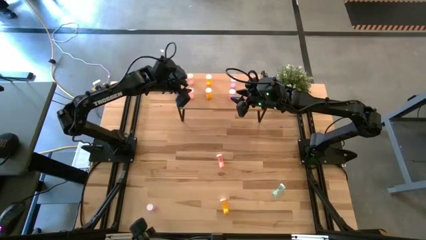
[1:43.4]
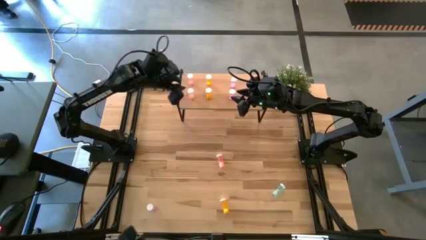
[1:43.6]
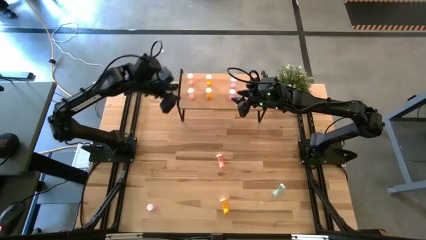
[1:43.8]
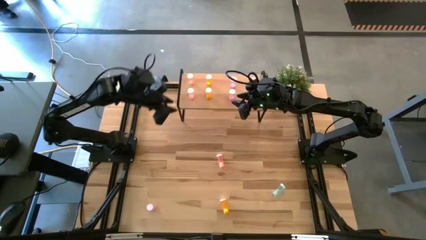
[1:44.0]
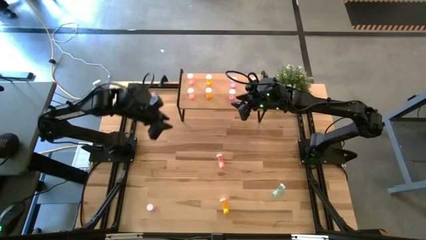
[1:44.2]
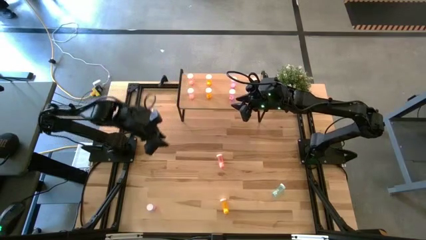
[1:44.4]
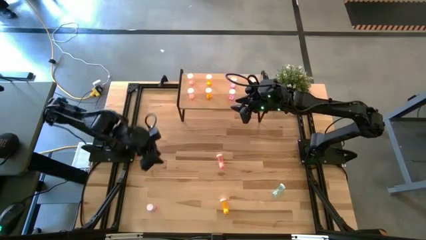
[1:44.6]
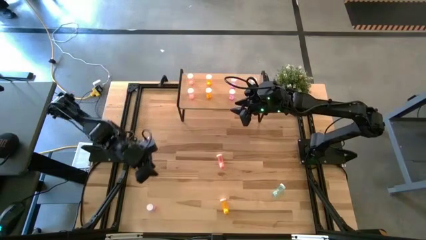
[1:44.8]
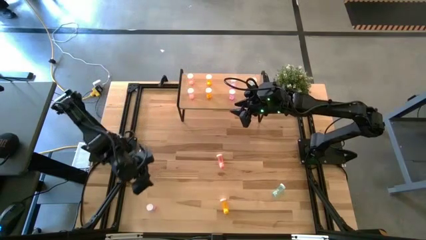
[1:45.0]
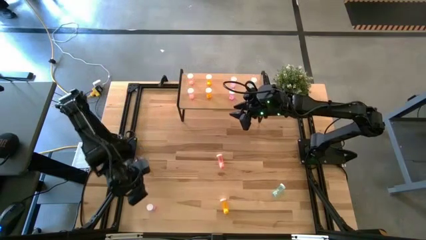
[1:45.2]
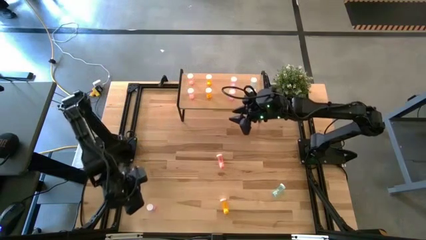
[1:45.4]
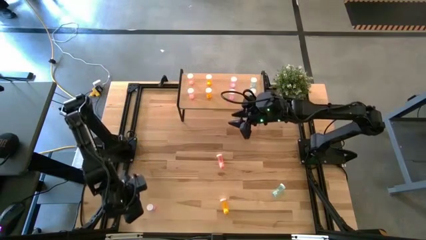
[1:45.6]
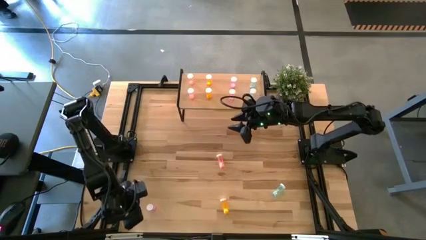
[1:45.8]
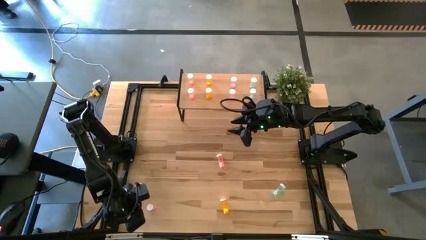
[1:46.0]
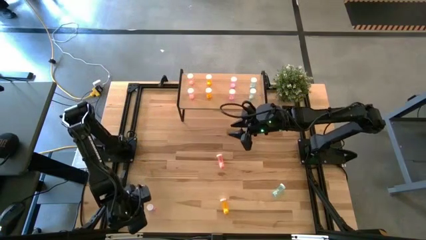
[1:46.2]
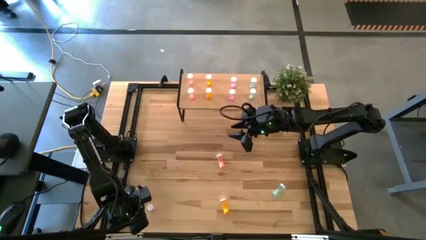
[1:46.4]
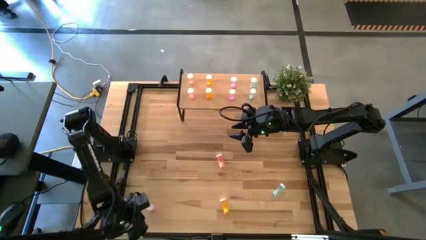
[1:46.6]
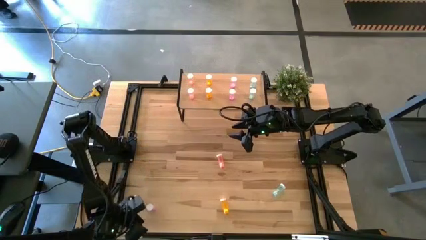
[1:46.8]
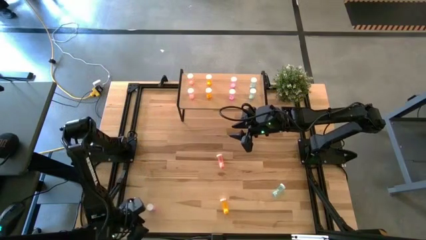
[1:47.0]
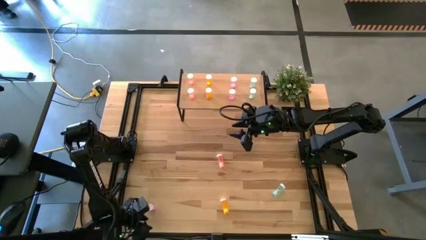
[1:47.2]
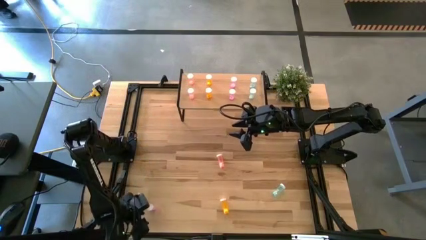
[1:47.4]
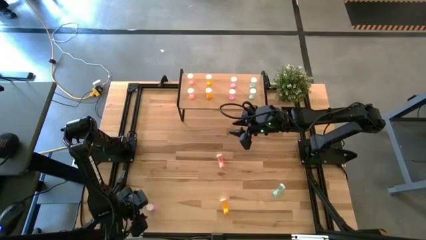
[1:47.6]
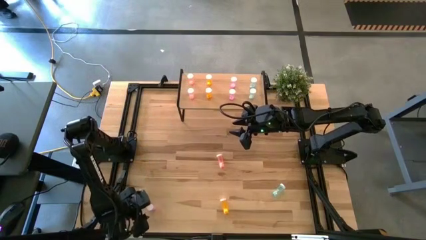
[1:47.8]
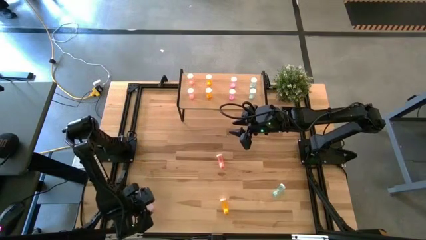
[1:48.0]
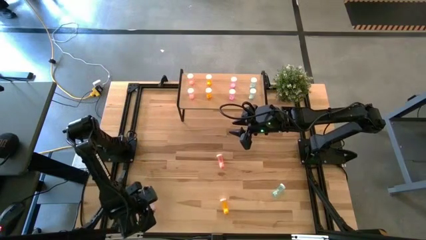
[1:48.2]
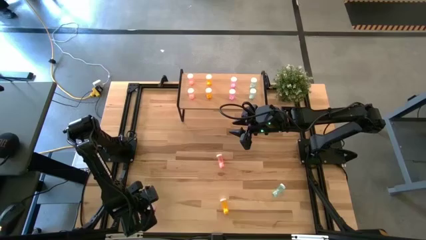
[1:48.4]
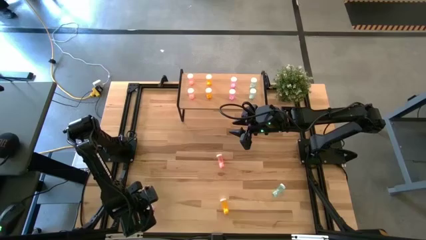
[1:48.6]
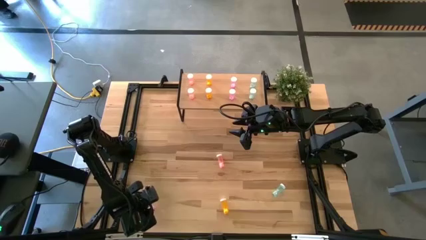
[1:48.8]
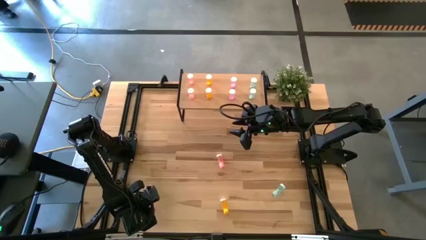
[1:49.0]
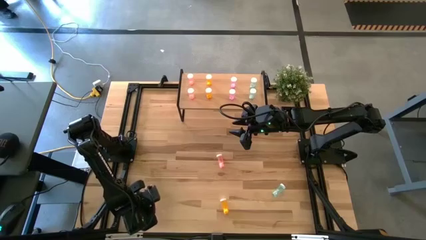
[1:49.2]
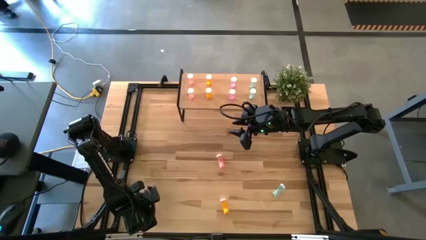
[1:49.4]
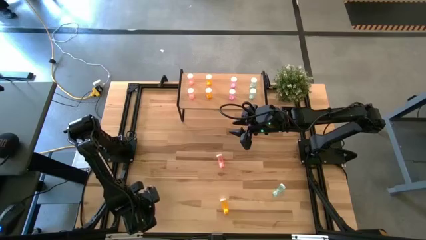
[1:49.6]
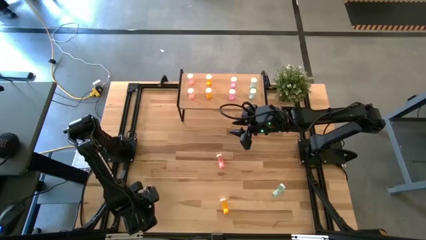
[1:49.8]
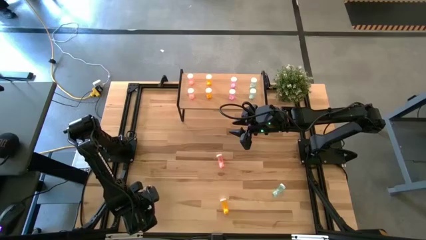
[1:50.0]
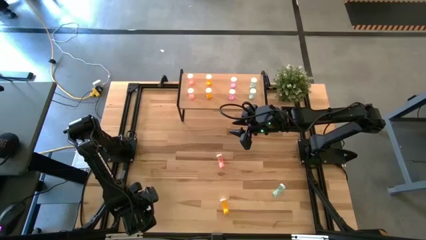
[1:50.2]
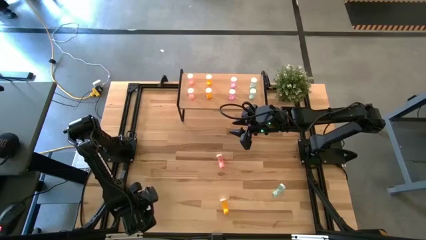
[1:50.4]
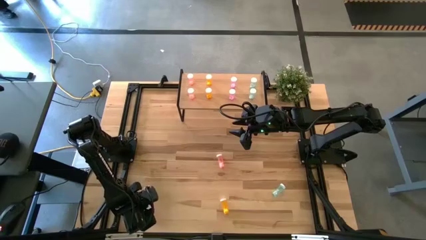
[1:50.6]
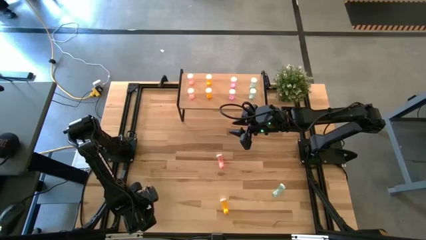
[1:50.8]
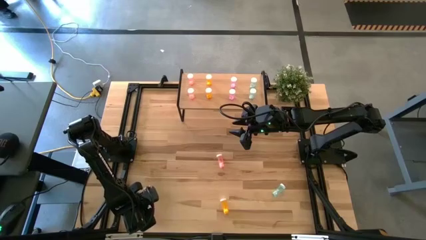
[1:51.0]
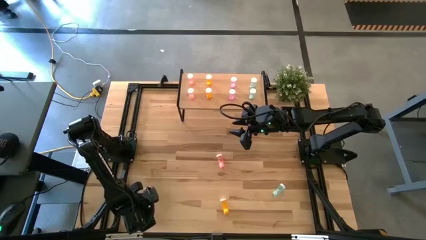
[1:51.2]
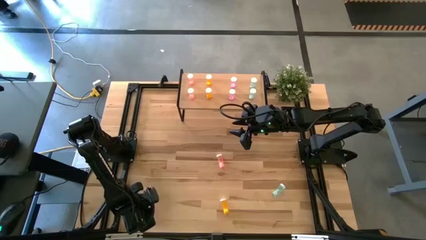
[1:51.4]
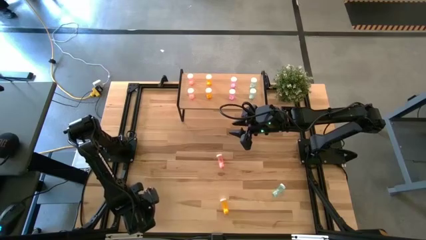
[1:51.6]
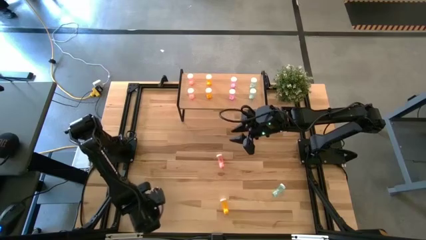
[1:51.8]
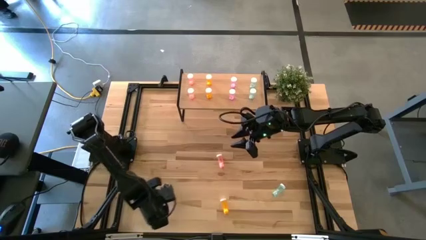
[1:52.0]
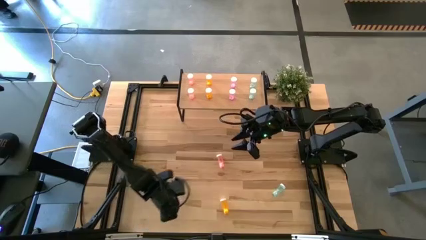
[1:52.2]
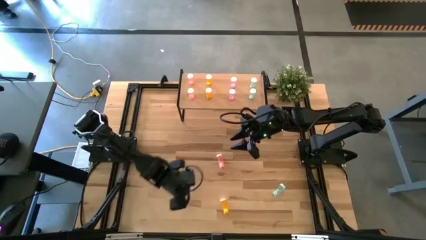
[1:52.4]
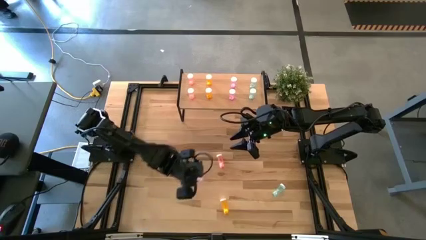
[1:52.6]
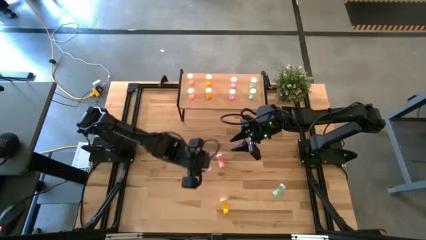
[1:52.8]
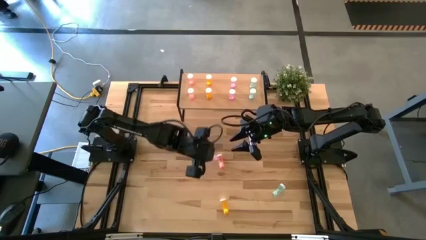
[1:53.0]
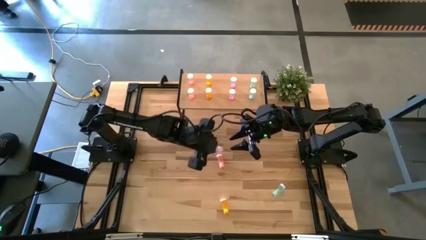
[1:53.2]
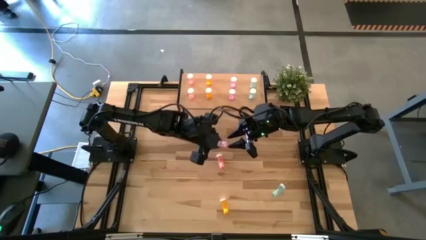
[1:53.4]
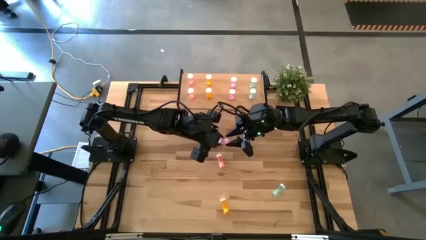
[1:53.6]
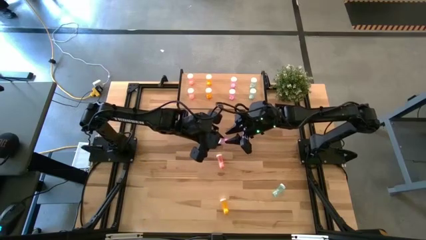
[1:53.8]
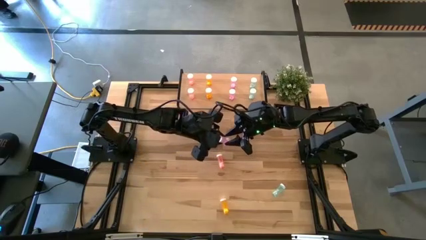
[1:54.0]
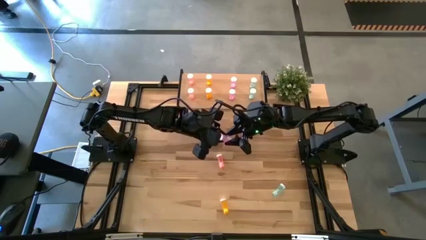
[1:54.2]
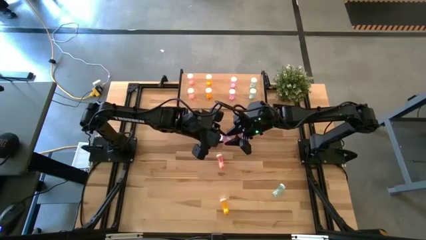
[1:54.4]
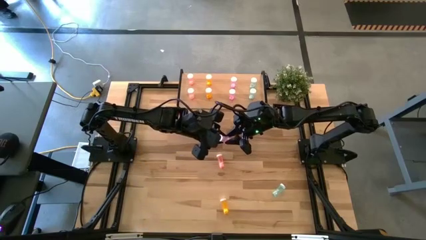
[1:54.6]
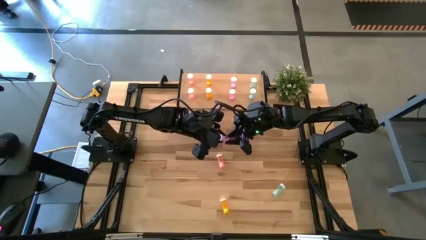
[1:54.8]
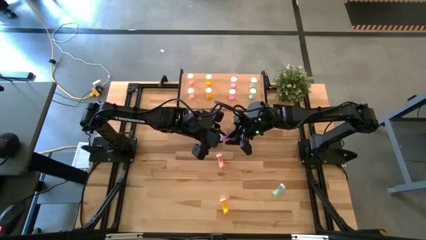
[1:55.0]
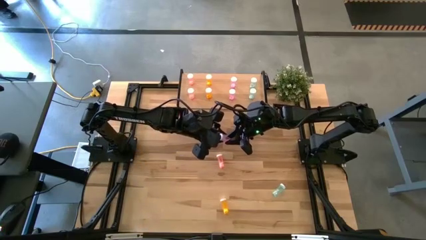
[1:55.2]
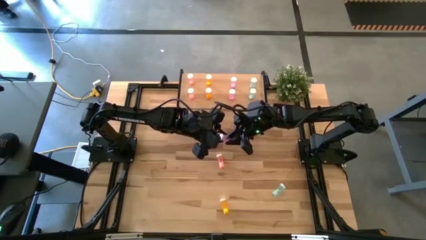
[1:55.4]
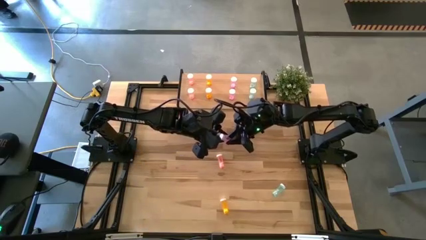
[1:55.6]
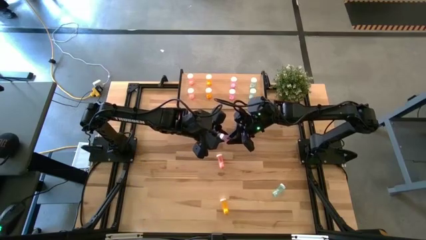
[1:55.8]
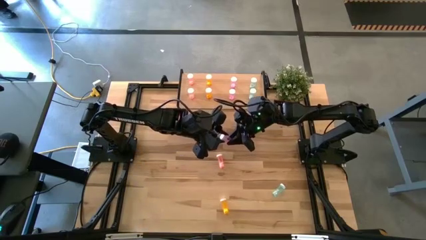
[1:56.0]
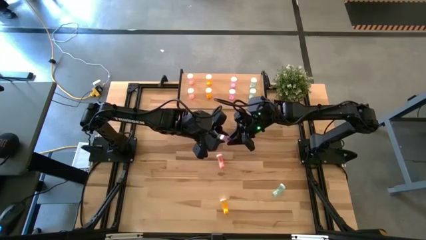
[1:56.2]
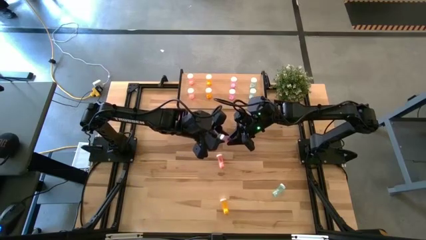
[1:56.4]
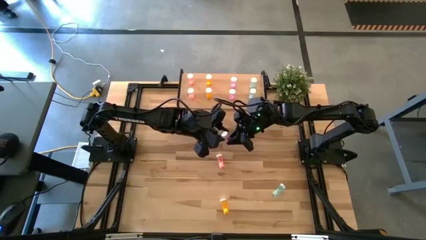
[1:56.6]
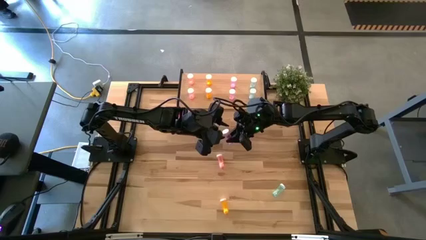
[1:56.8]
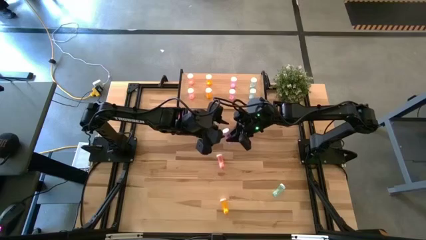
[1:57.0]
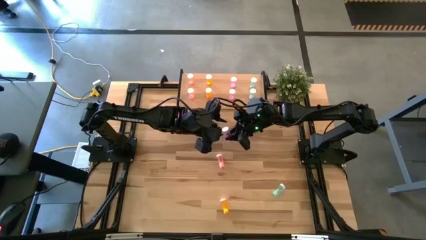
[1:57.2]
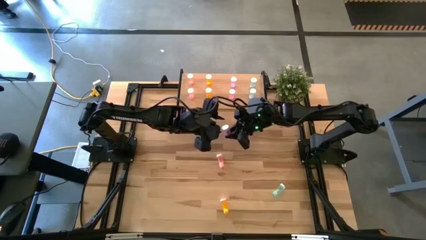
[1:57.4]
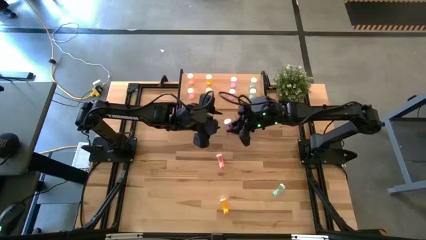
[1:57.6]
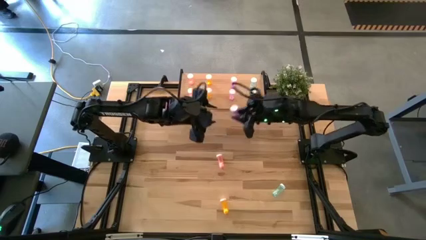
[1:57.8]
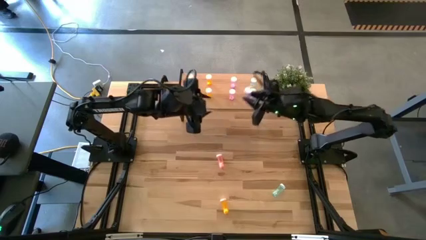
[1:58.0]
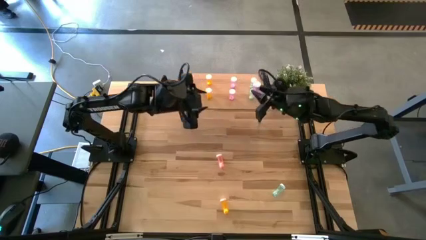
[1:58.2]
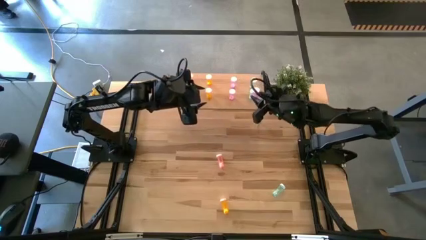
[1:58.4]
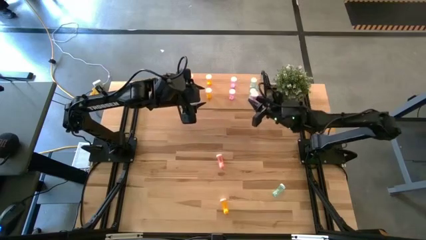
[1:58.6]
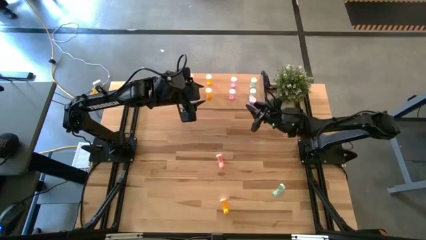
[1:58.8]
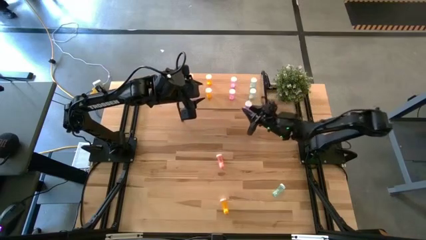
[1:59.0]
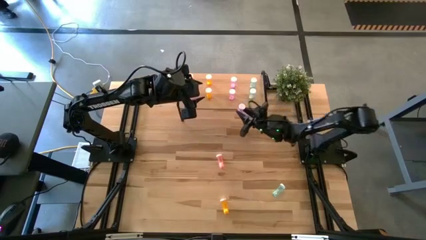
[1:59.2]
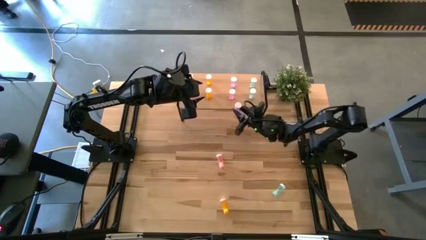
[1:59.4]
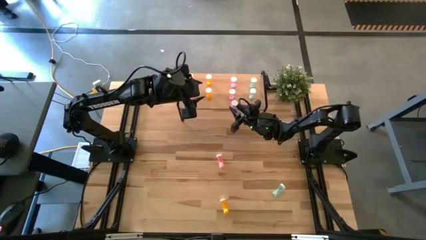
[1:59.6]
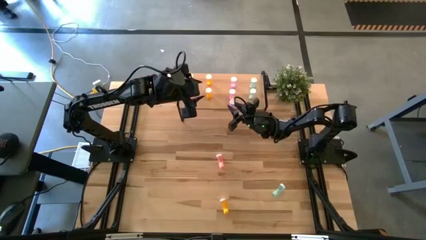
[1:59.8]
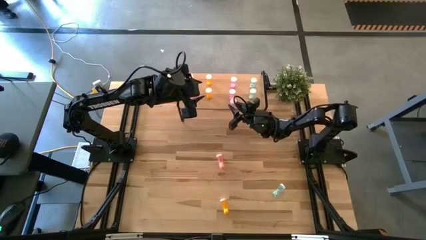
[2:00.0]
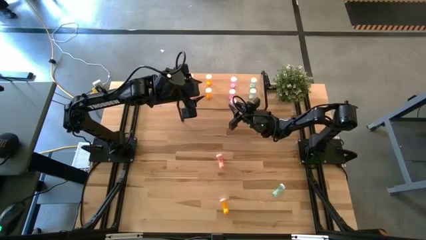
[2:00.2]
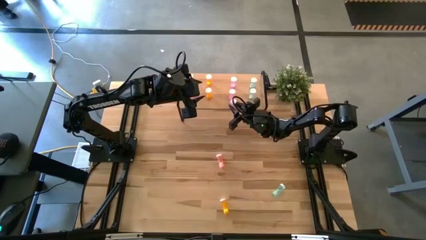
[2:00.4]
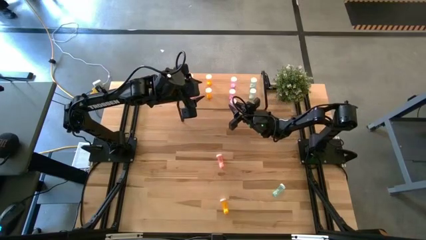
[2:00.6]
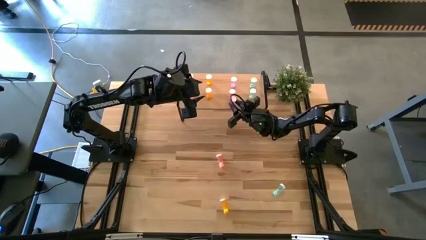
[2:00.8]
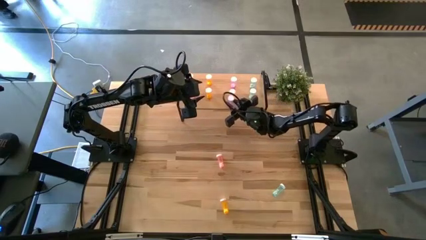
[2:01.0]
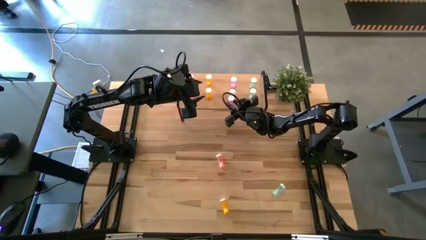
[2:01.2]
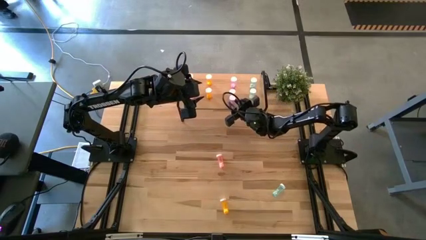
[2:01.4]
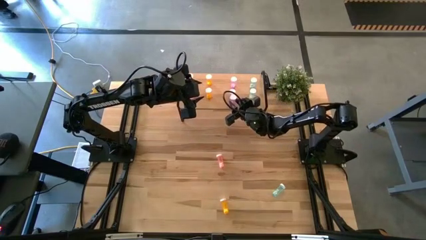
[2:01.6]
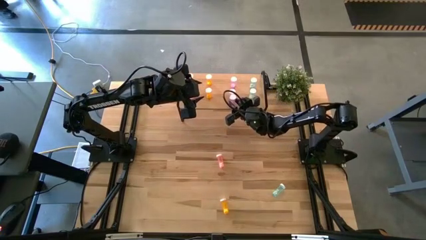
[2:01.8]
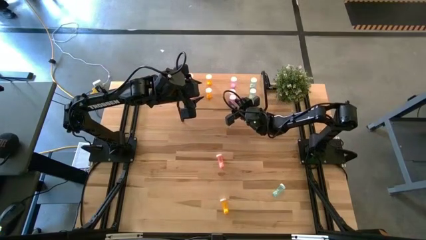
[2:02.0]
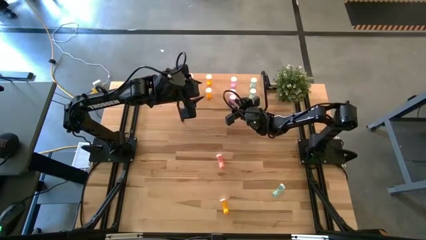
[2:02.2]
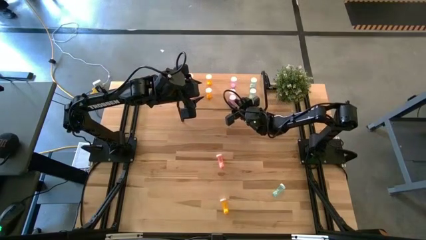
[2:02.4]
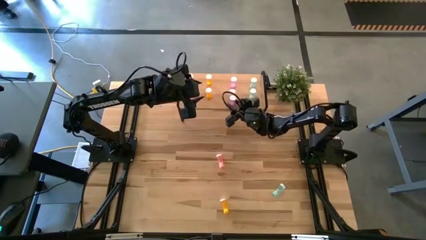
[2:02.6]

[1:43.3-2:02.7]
Task: Pick and place medicine bottles onto shelf by color
Put the purple pill bottle on the shelf aligned with the other purple pill bottles
